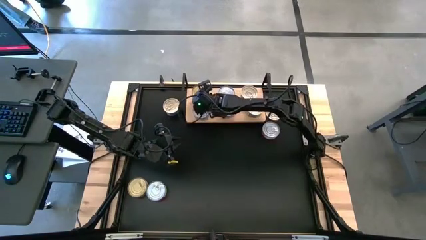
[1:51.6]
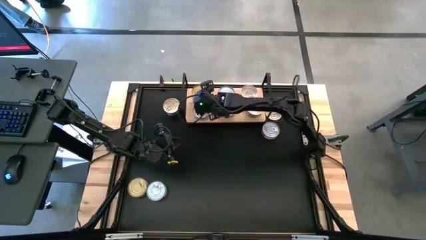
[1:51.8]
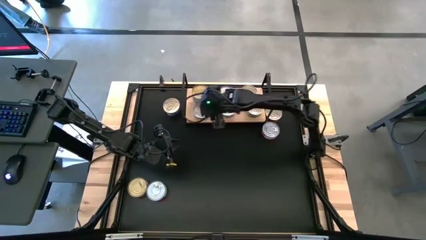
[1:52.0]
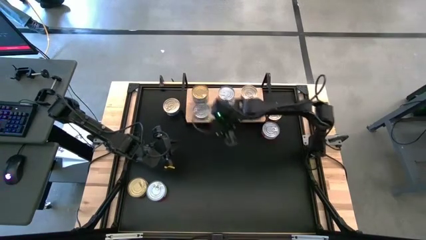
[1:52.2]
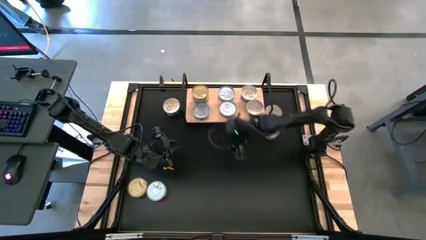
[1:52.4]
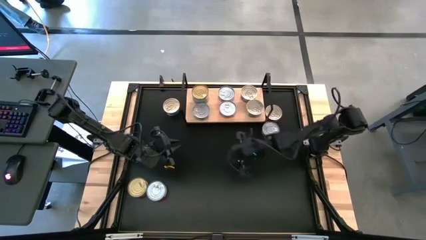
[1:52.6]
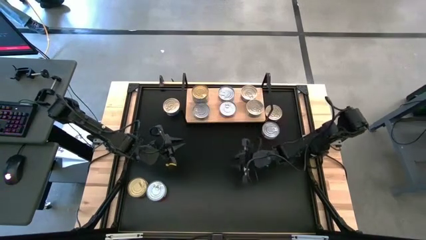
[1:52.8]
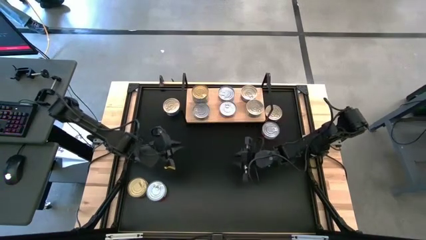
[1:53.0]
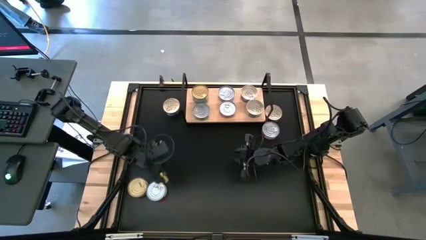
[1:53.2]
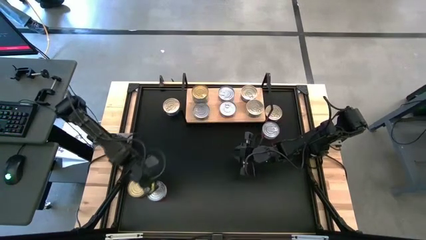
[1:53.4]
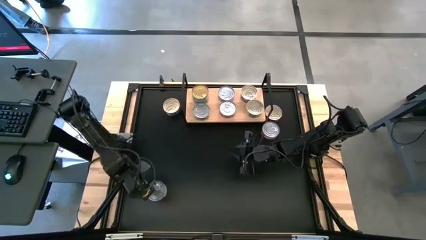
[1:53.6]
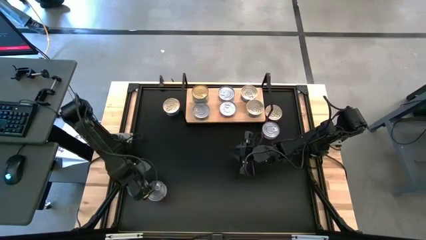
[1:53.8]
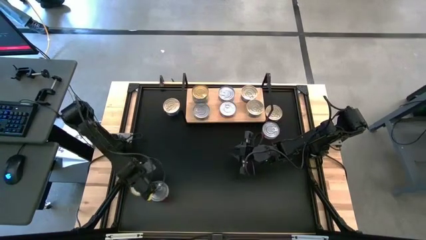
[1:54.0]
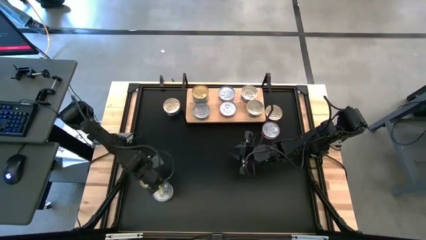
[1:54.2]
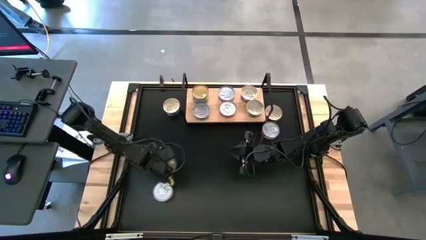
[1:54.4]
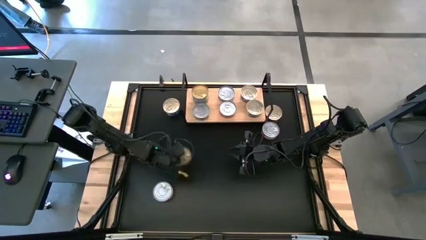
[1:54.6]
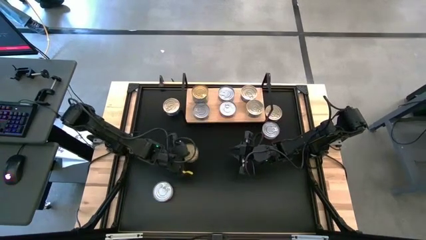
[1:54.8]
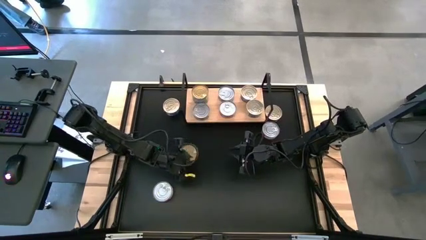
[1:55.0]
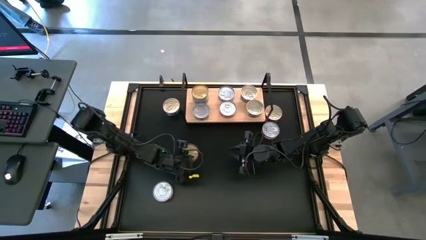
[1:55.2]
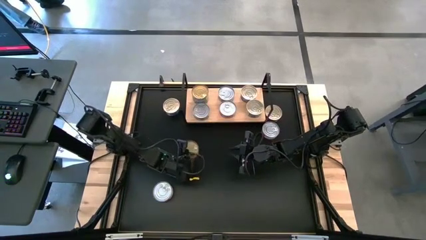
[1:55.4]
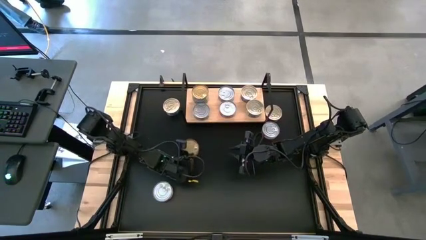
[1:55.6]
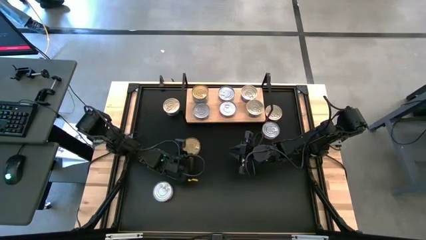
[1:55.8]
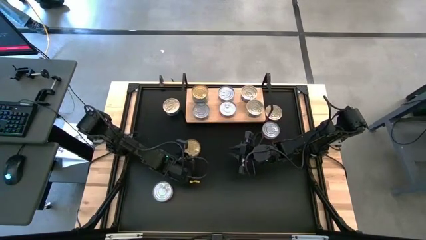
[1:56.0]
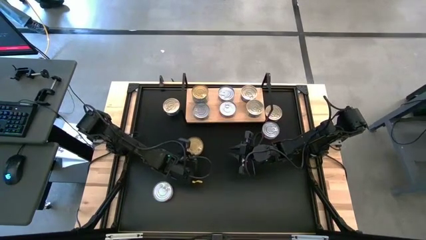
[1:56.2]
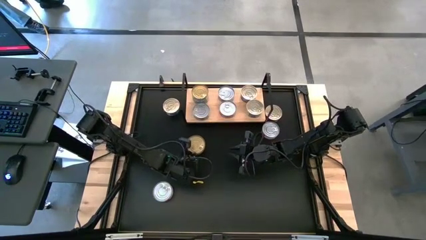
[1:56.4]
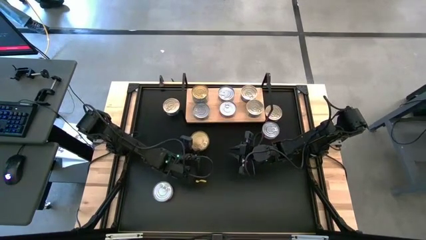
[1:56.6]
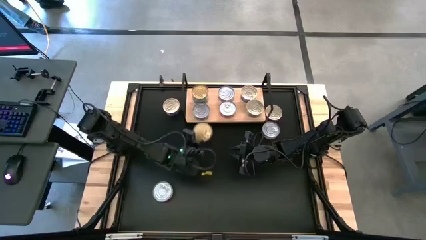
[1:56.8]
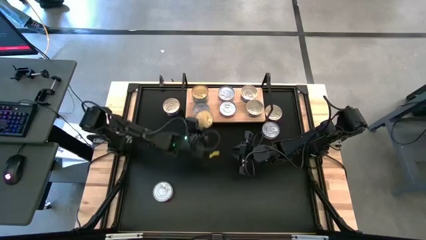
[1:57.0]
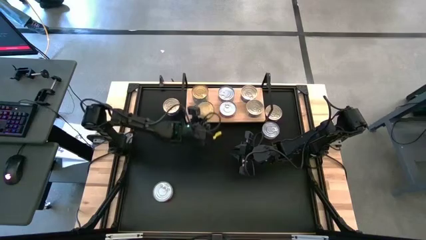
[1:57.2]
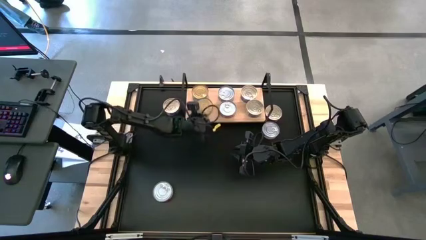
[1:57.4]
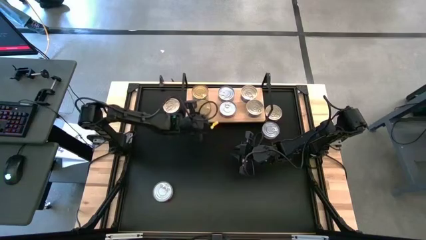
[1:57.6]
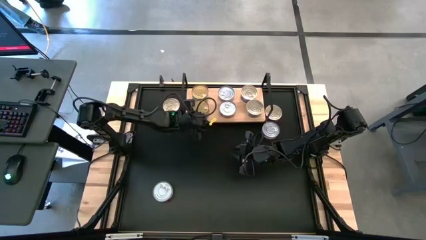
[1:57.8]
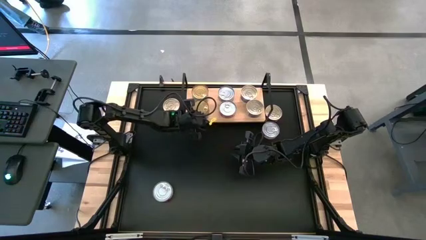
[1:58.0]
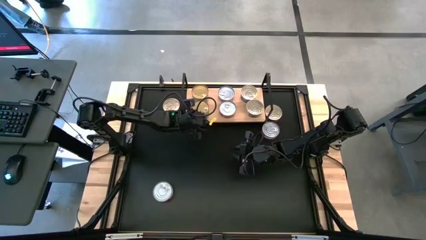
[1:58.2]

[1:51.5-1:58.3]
Task: Stack canned seafood by type on shelf
Stack the green tuna can on top of the green tuna can

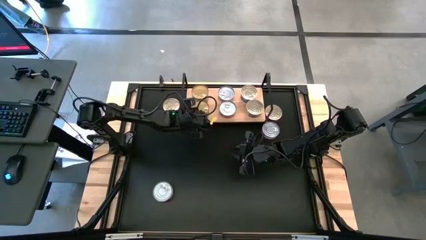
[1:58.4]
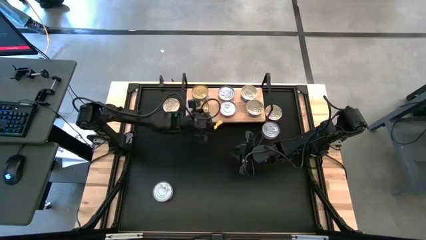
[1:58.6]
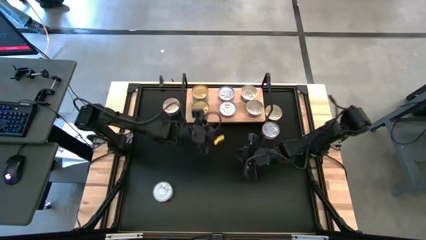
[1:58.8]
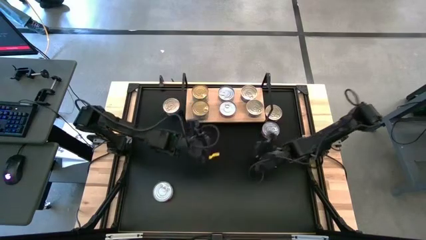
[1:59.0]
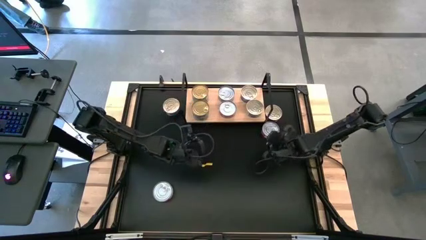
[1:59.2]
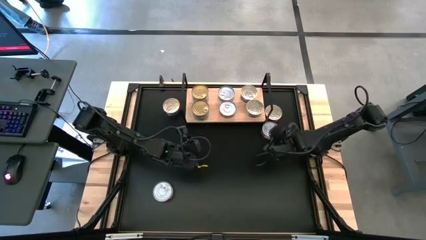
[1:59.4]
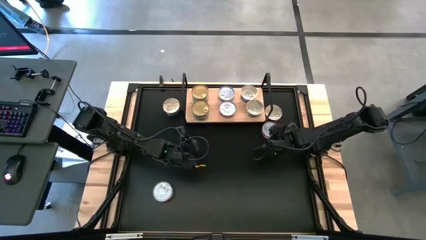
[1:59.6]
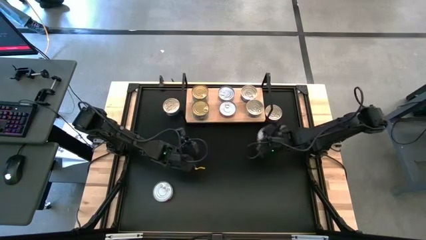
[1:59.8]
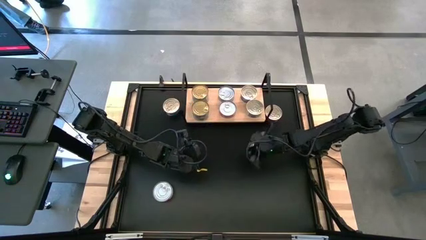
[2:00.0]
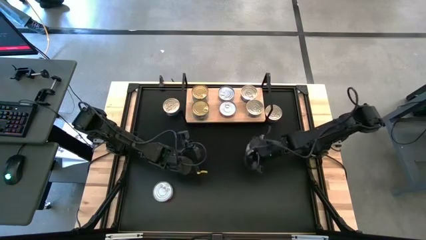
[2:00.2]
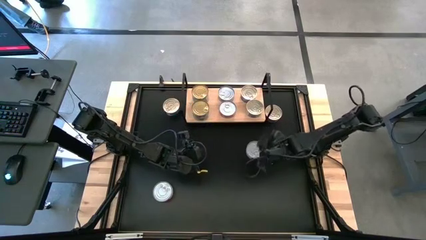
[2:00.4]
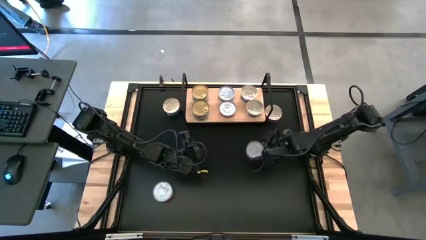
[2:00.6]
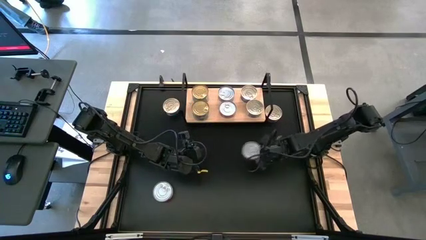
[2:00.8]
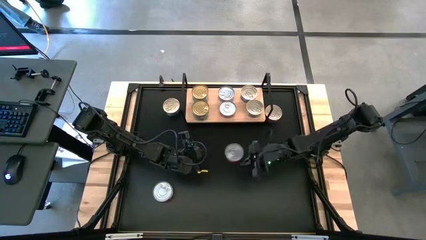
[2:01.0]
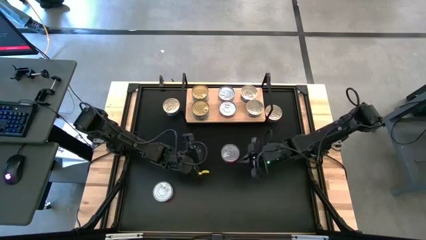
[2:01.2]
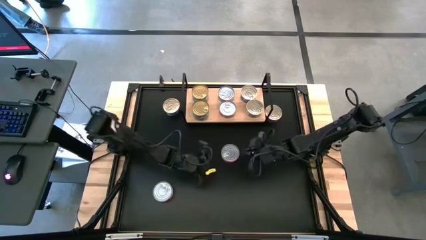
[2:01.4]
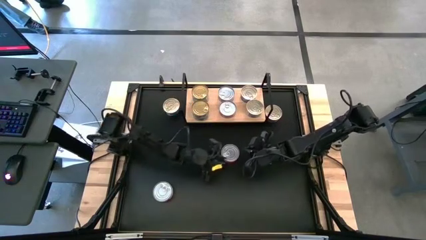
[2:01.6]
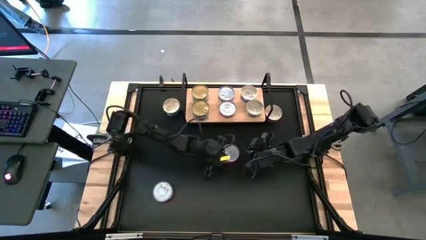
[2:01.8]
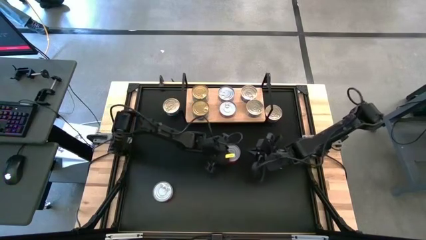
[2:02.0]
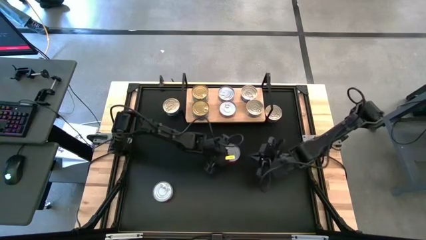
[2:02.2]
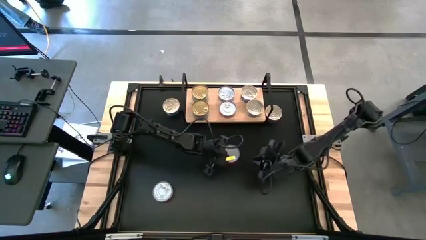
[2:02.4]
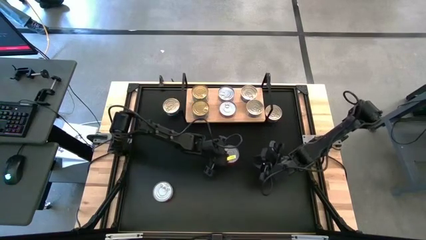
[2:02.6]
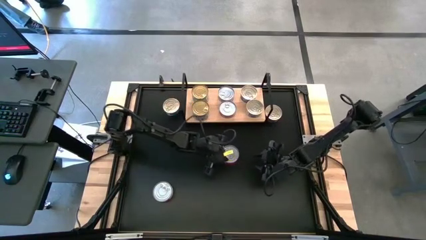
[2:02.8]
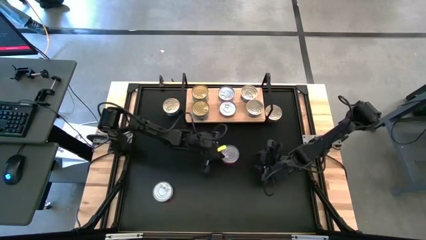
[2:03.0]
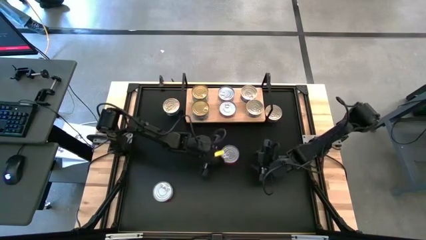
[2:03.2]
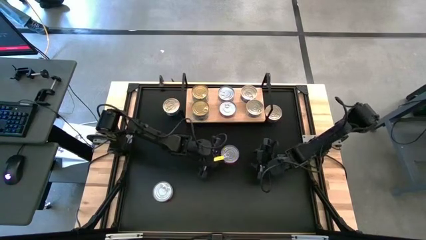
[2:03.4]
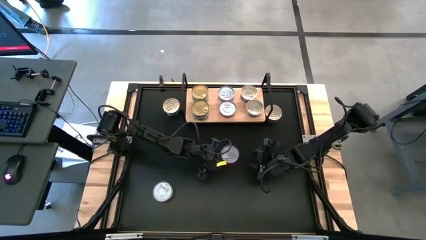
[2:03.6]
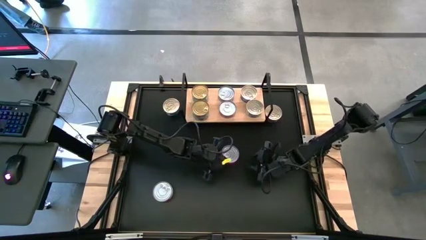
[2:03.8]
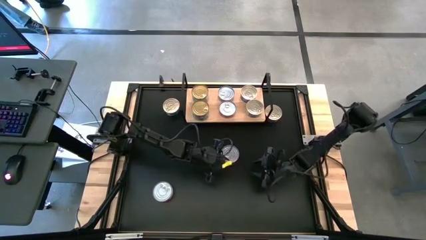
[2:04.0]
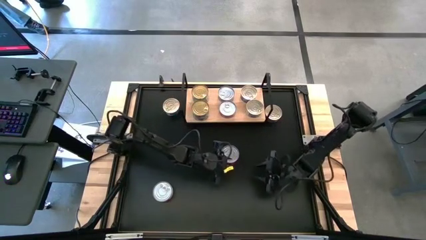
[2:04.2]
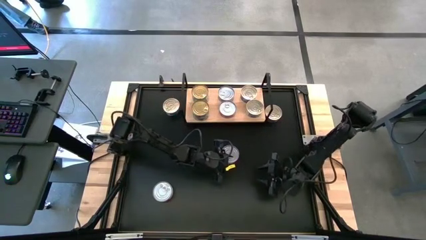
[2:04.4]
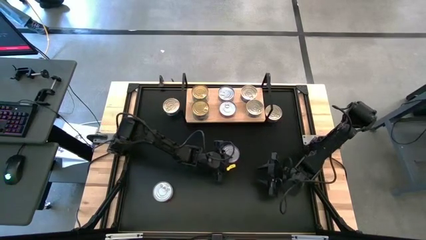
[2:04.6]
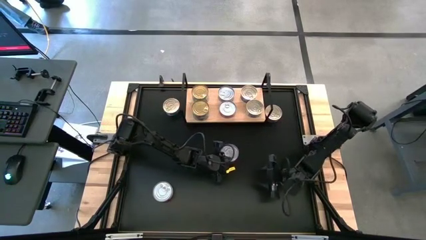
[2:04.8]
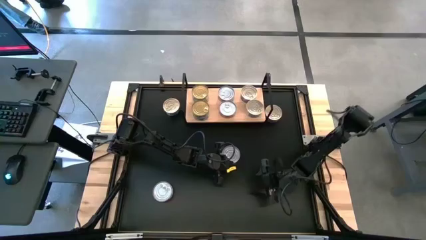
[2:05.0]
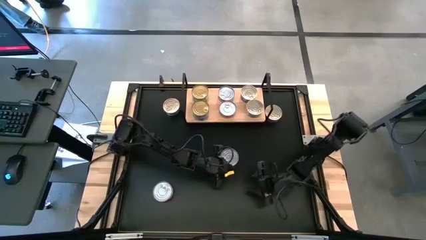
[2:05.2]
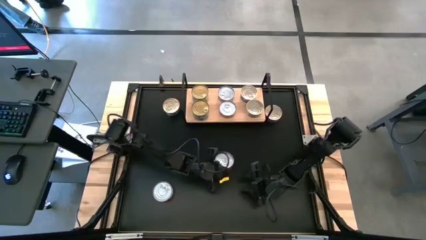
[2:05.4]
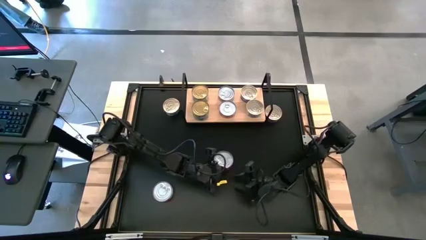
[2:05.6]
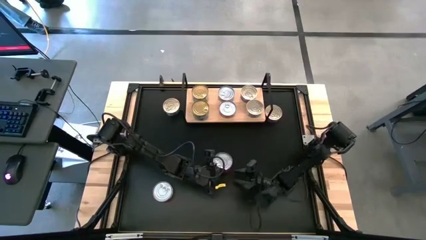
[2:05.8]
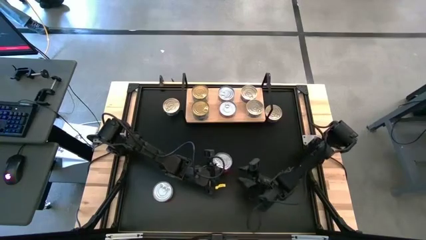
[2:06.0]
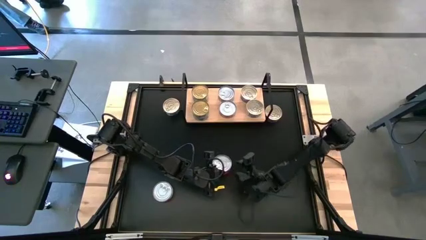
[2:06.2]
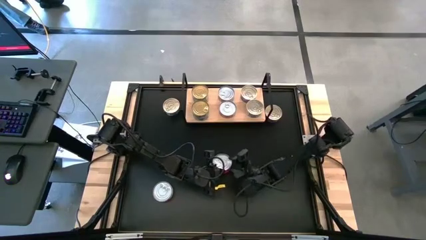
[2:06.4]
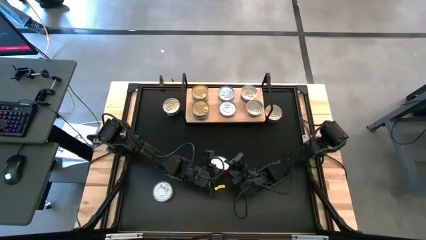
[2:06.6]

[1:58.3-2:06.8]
Stack the red tuna can on top of the red tuna can
